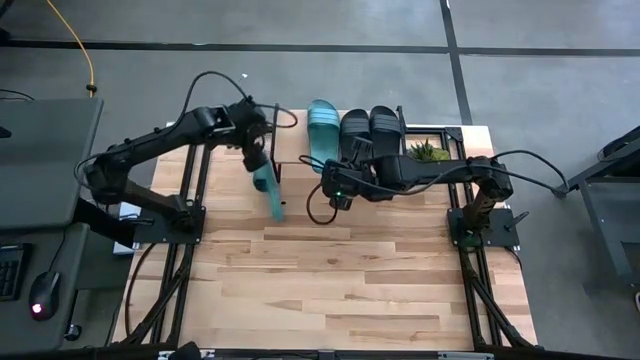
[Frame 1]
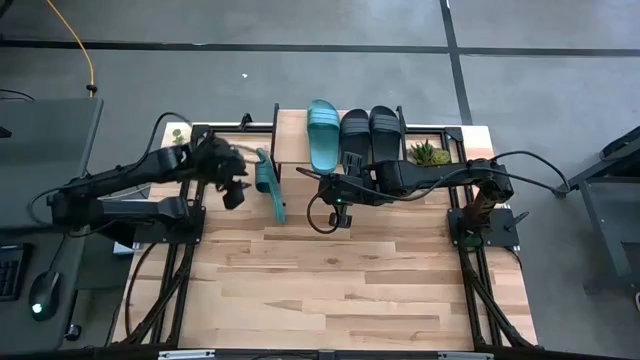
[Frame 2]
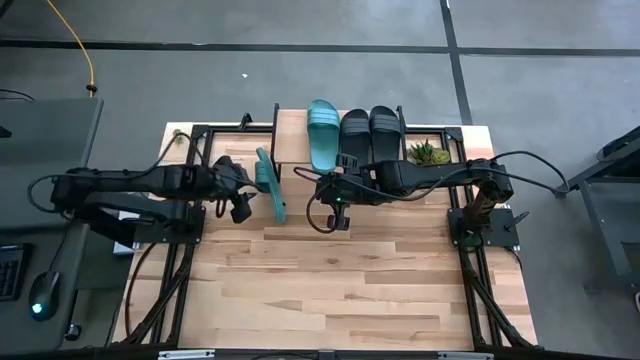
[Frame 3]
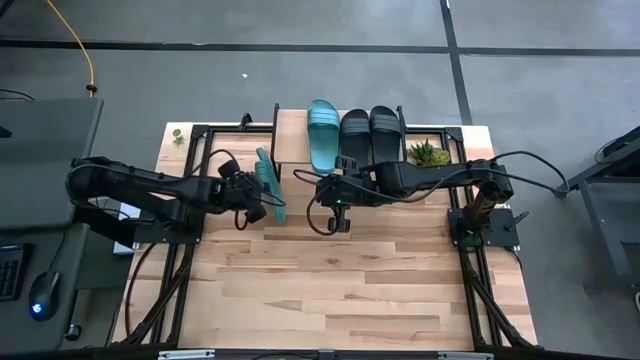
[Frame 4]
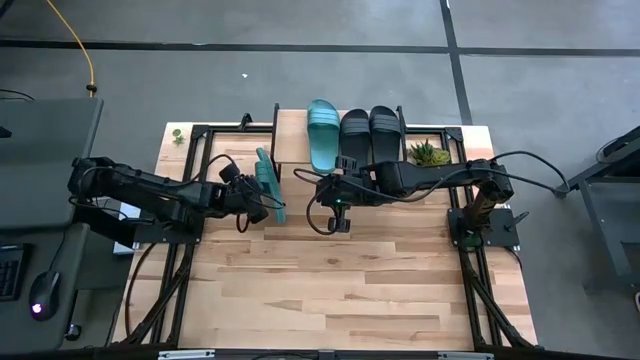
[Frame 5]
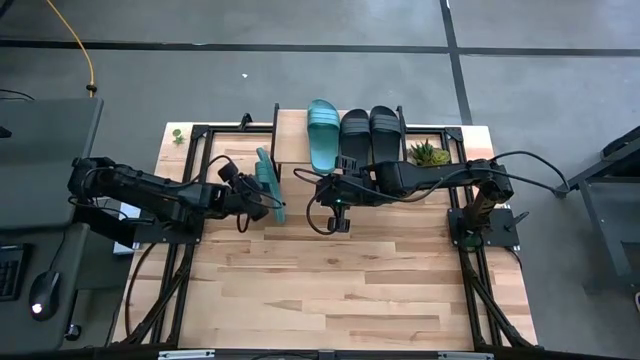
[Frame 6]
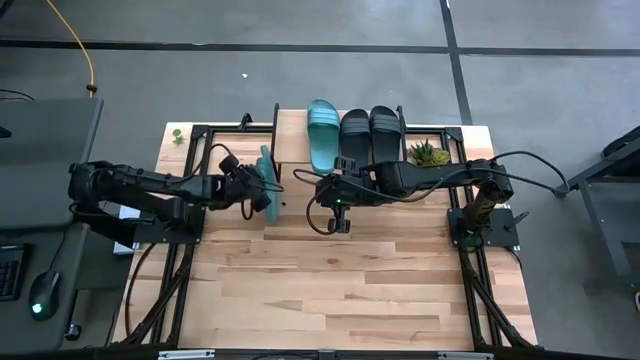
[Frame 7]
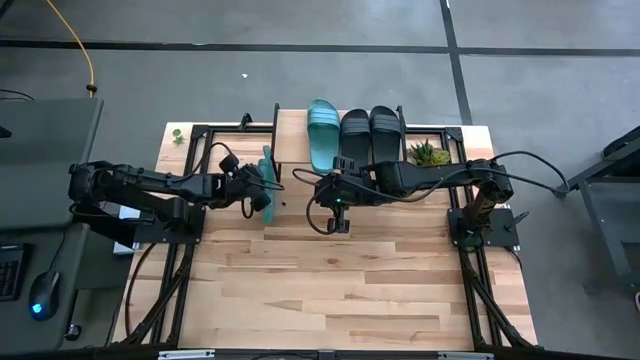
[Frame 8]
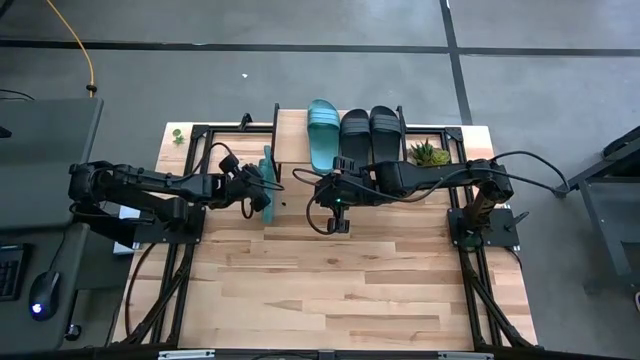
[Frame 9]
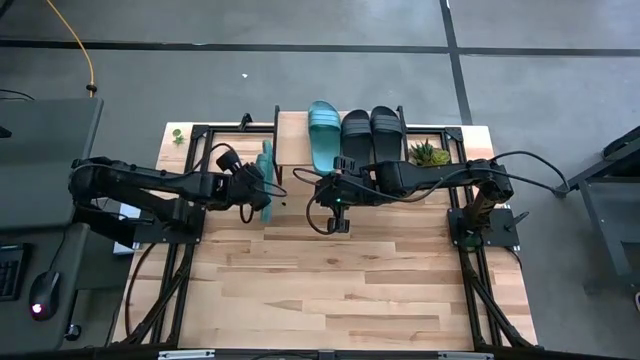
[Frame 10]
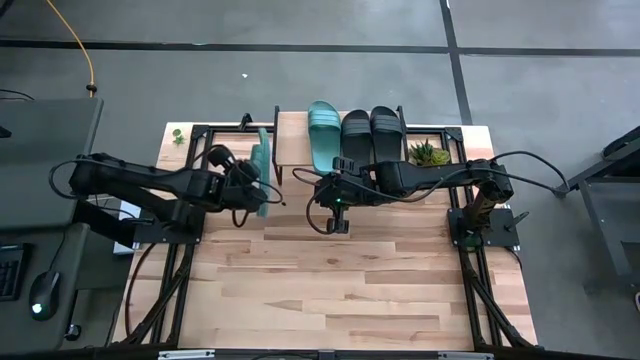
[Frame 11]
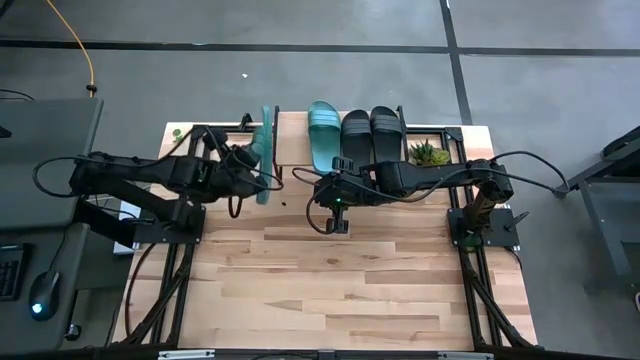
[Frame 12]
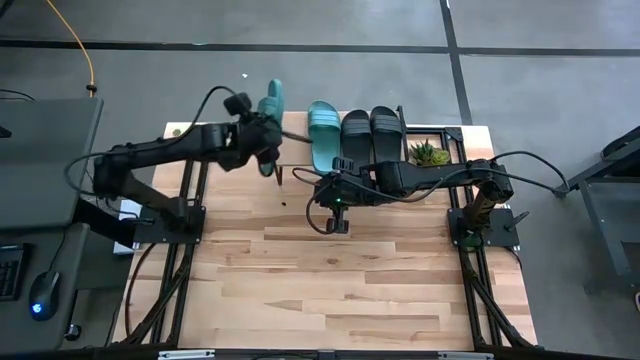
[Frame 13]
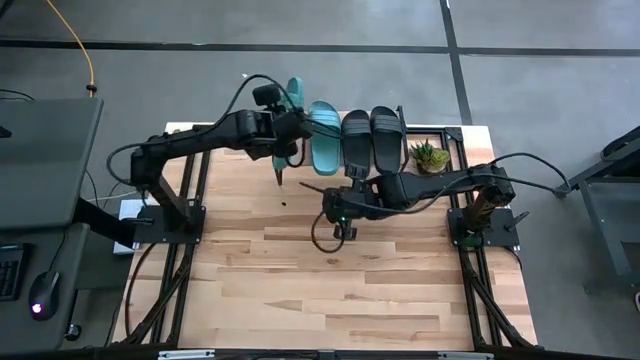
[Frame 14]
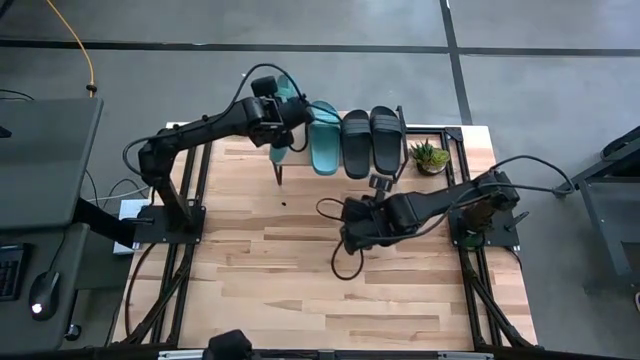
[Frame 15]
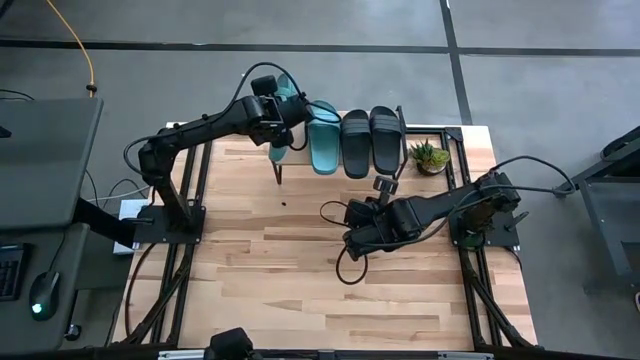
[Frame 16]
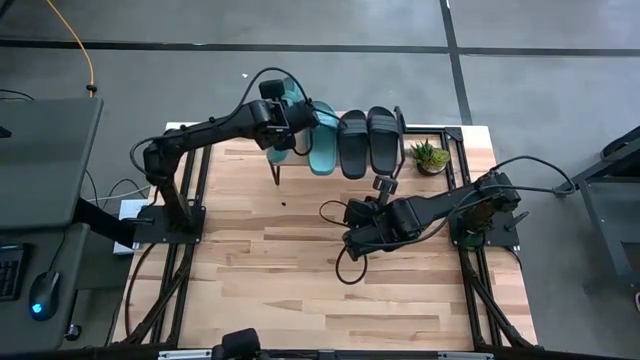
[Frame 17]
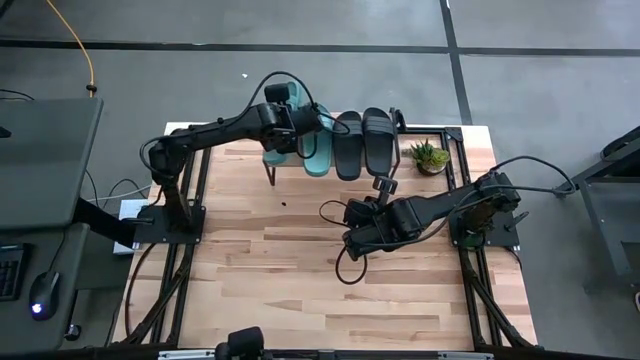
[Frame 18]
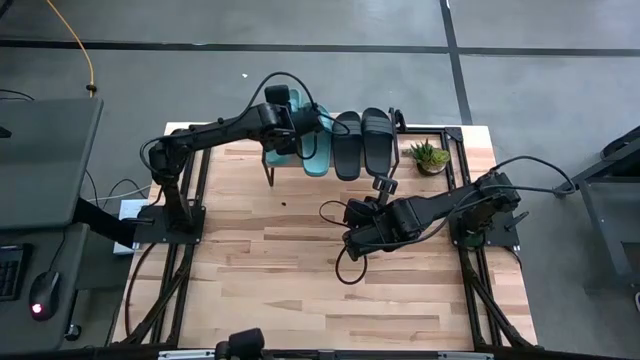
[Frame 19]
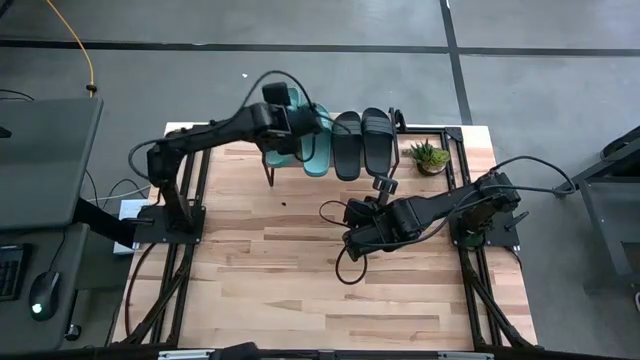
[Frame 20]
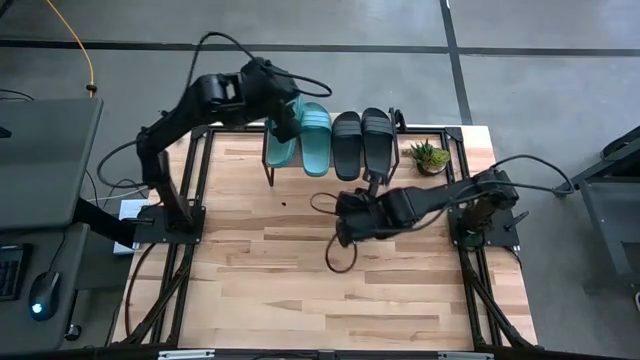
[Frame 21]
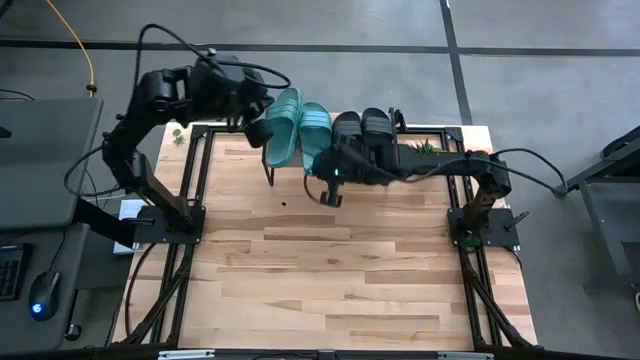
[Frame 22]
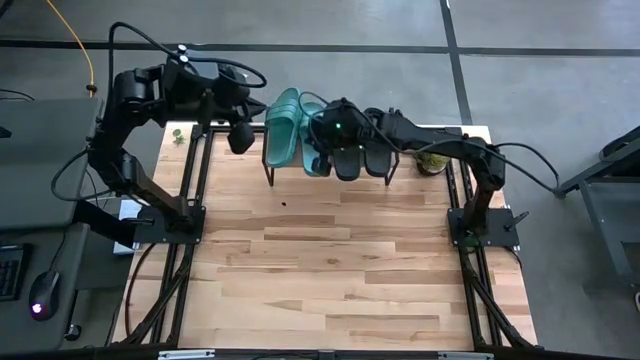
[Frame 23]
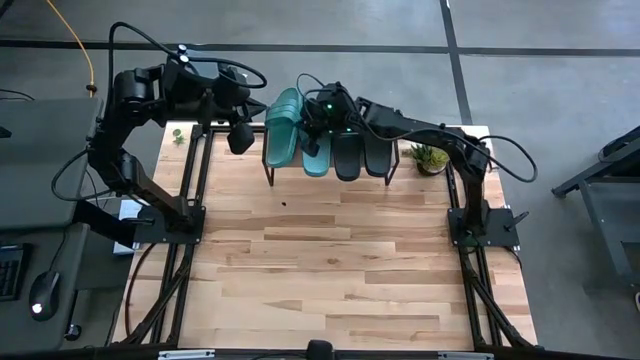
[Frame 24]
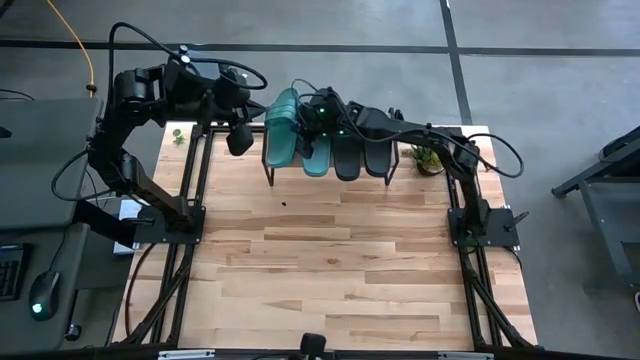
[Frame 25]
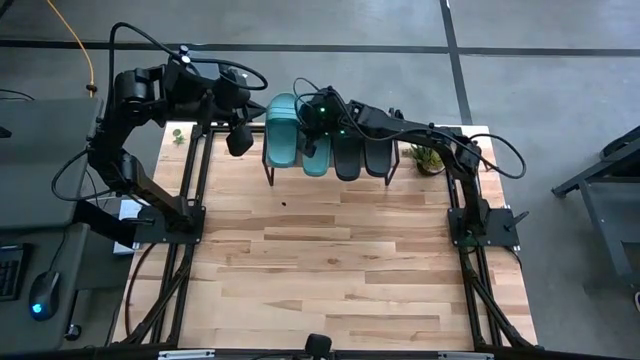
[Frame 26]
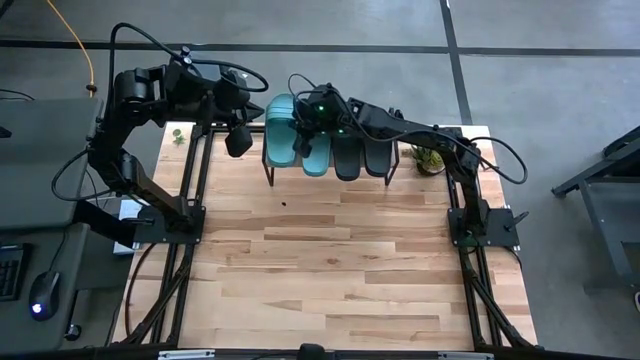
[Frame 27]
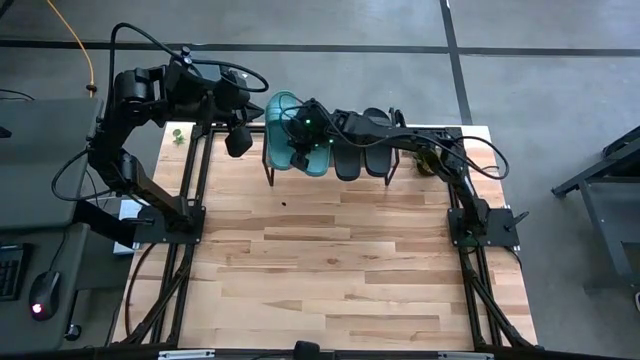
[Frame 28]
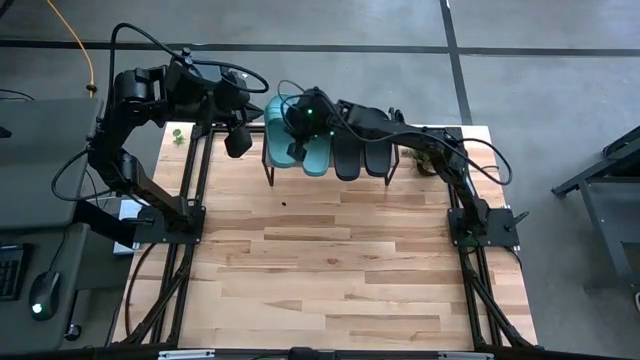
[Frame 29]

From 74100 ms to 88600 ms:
Task: Pick and place slides into the shelf
Put the green slide on the shelf

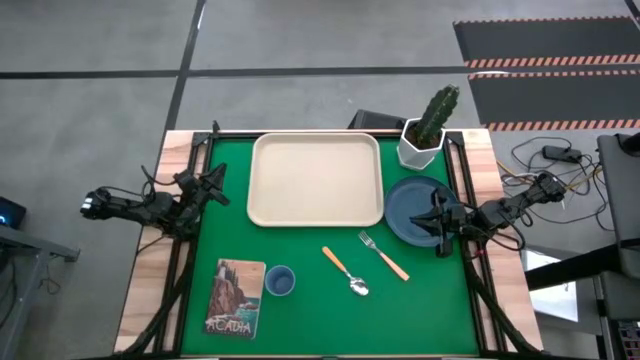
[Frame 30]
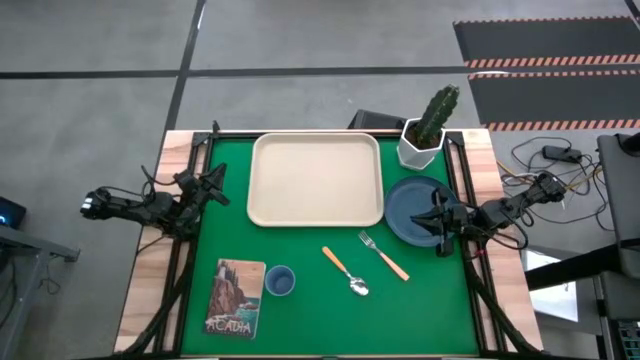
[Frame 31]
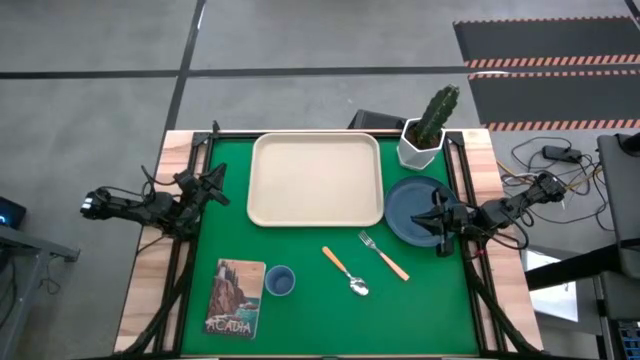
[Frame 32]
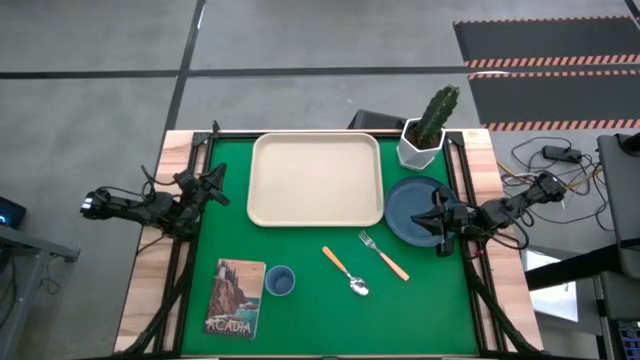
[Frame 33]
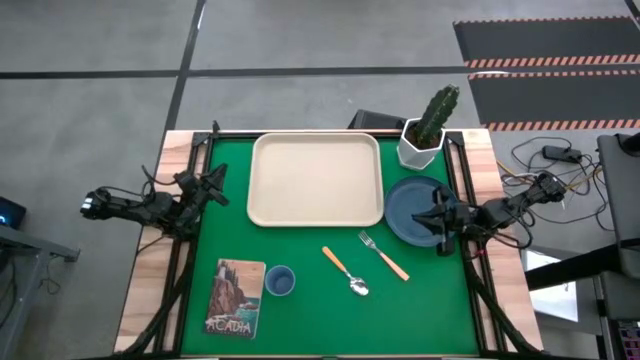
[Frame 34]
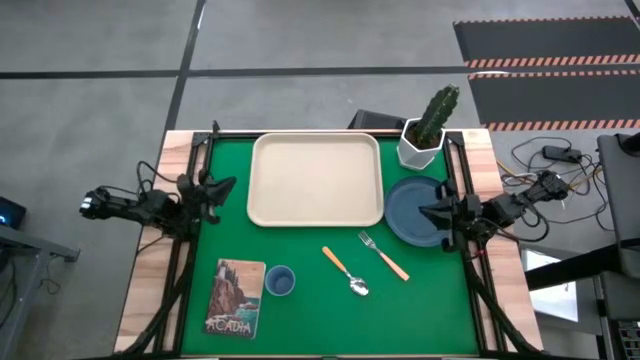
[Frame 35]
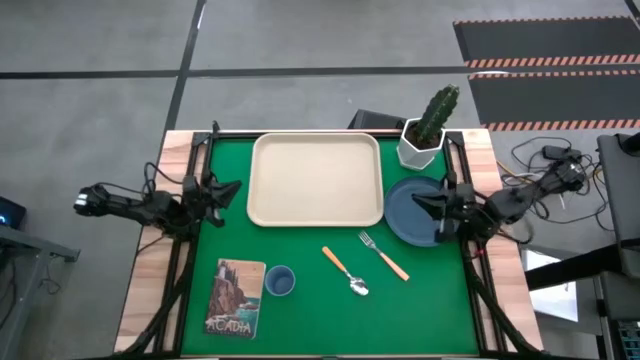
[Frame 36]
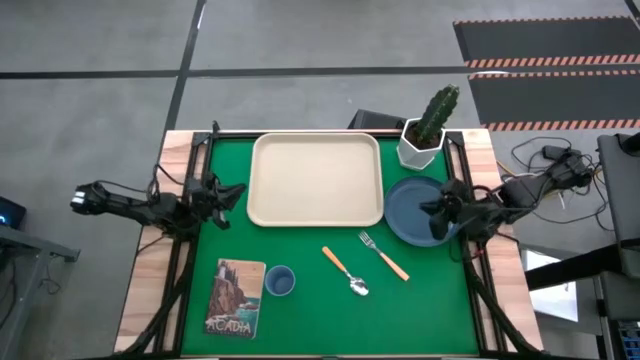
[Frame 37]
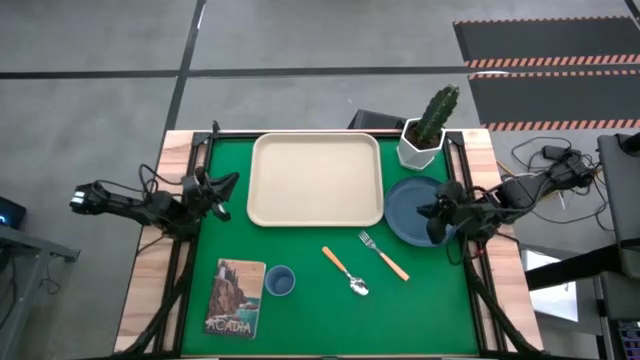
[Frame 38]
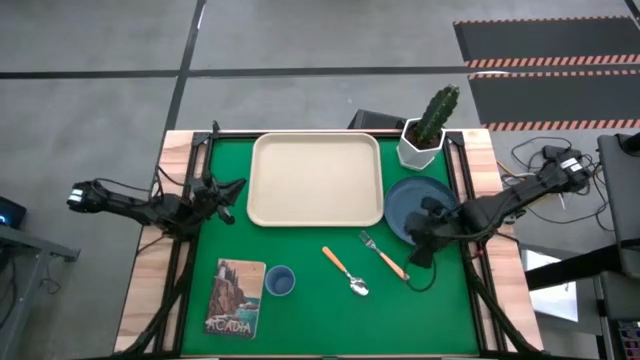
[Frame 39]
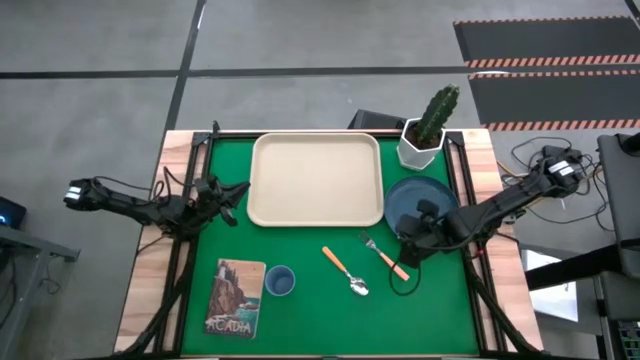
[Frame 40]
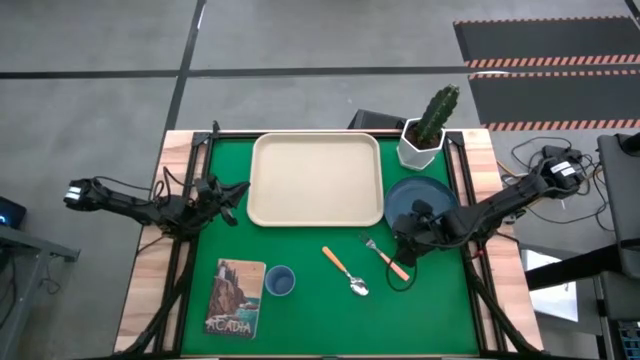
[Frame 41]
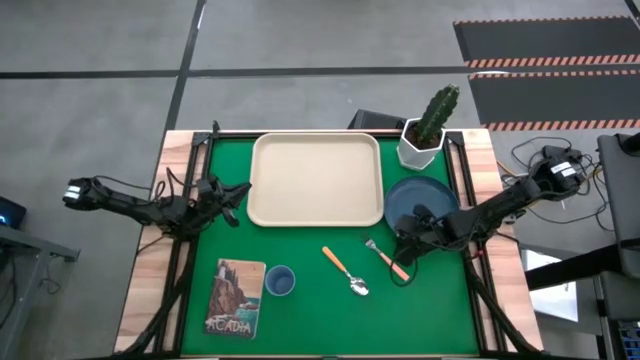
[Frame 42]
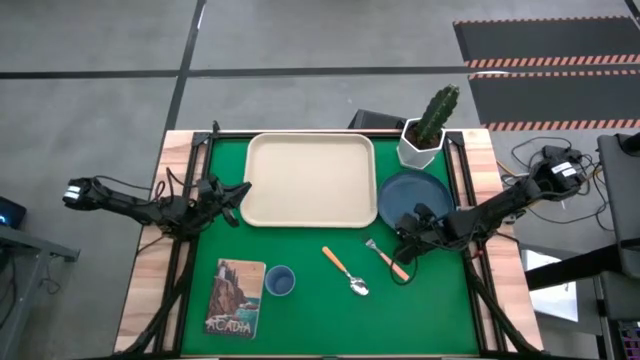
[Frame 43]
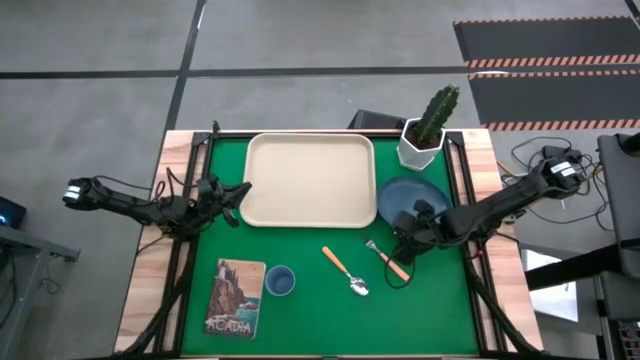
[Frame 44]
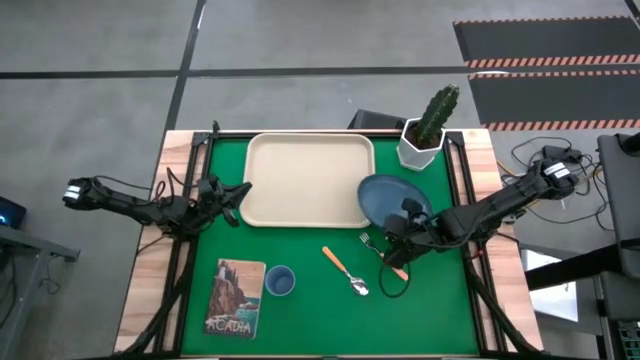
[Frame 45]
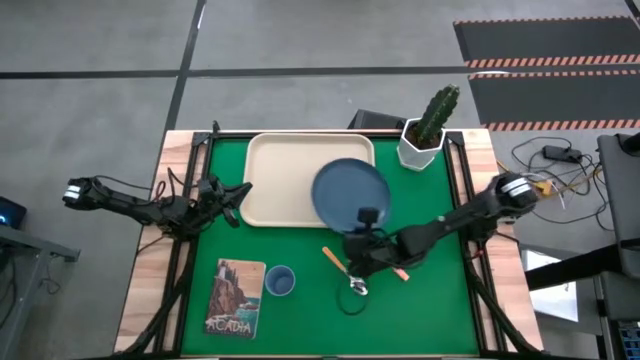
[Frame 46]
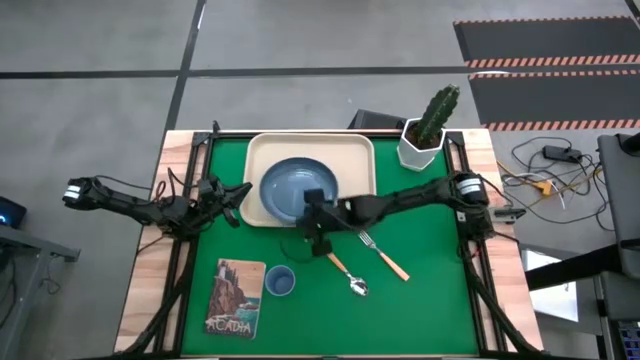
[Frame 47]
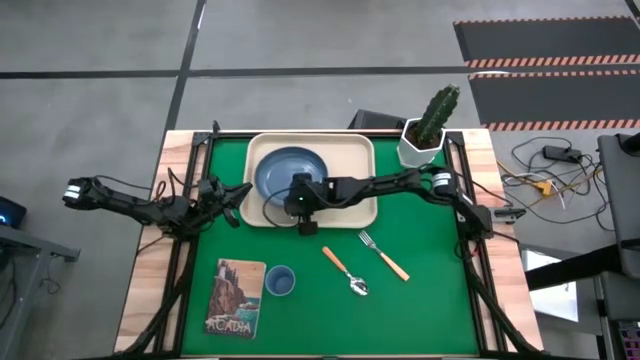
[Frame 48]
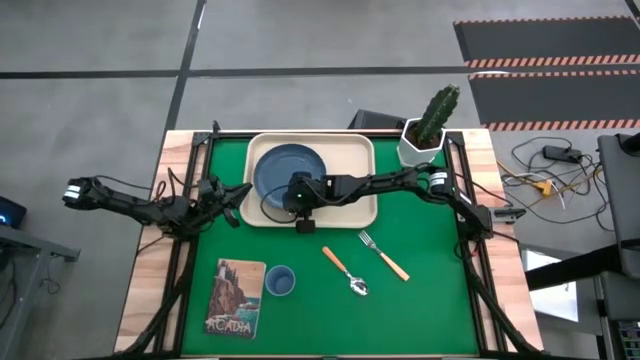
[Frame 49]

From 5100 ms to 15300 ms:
Task: Pick and place plate/cup/fork/spoon on tray
Put the blue plate on the white tray
